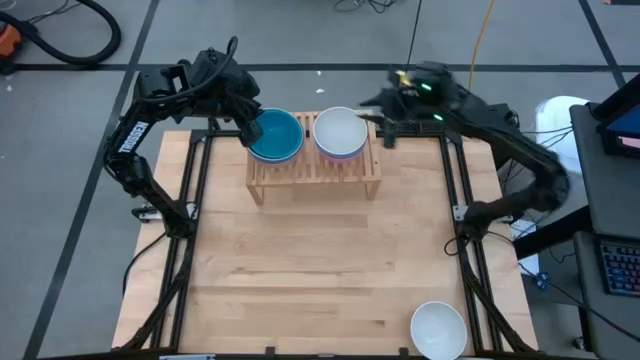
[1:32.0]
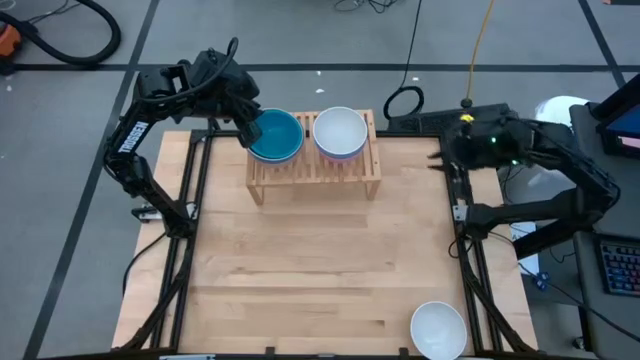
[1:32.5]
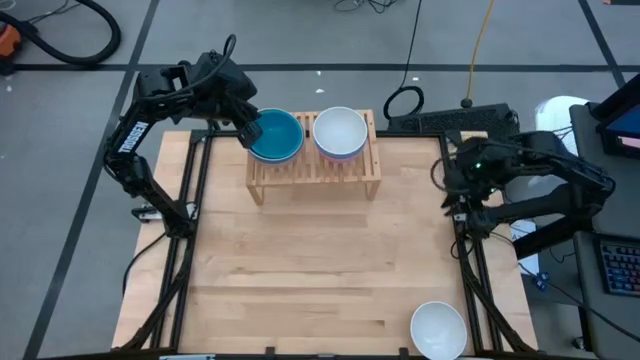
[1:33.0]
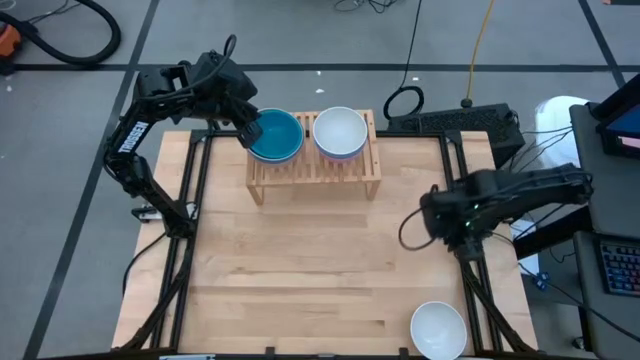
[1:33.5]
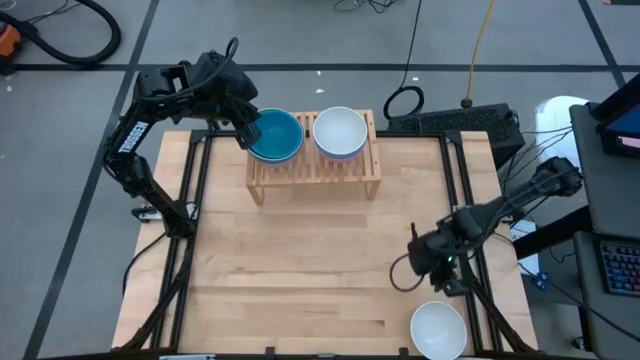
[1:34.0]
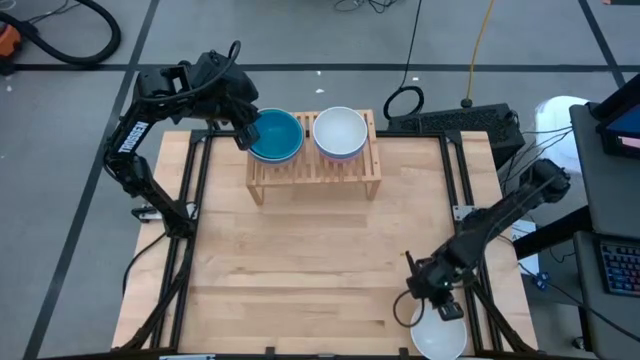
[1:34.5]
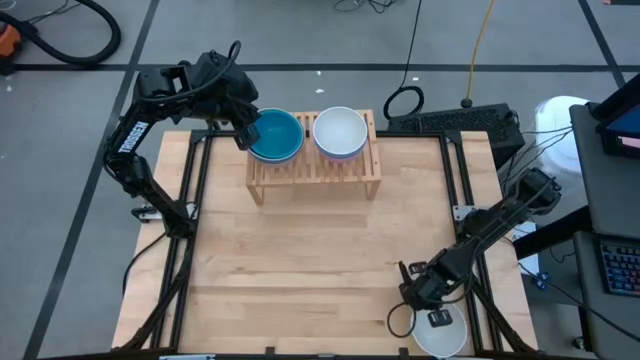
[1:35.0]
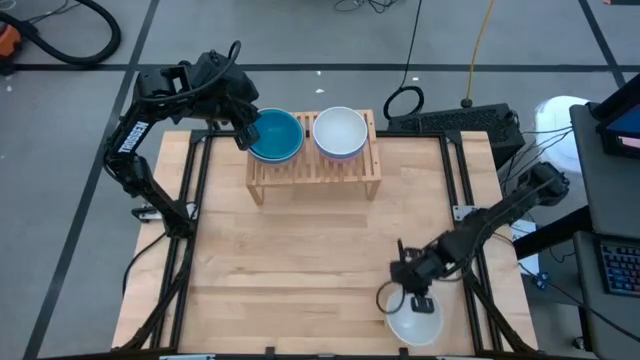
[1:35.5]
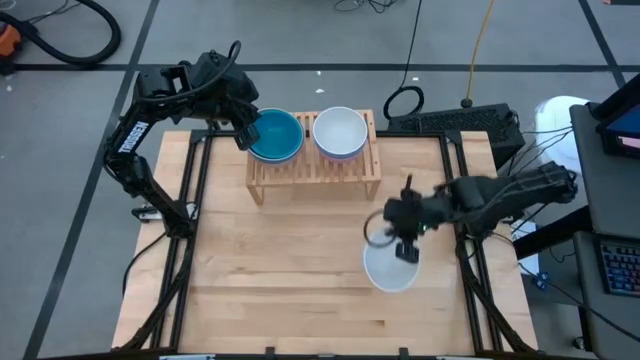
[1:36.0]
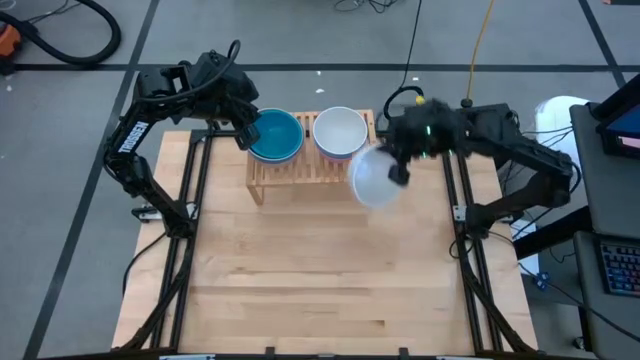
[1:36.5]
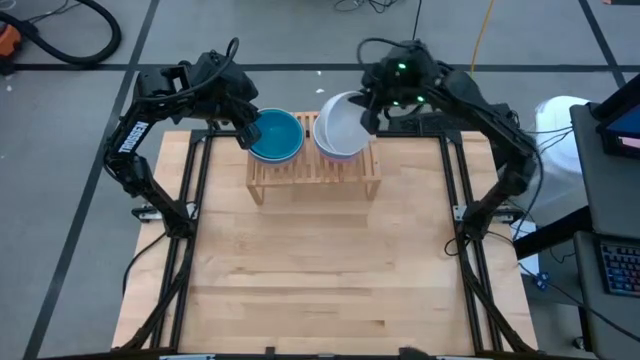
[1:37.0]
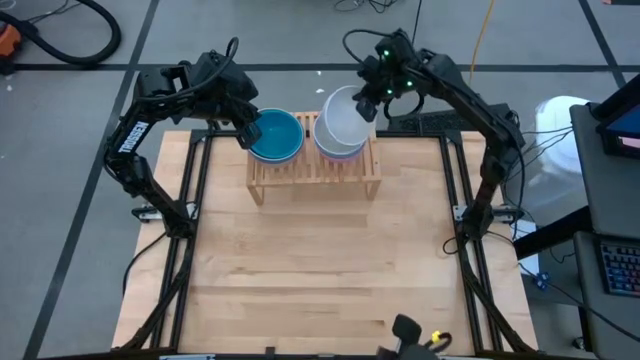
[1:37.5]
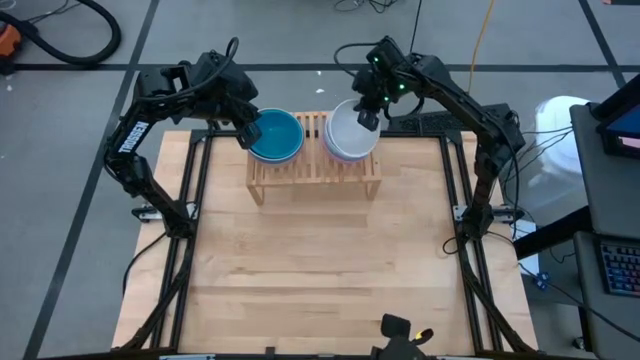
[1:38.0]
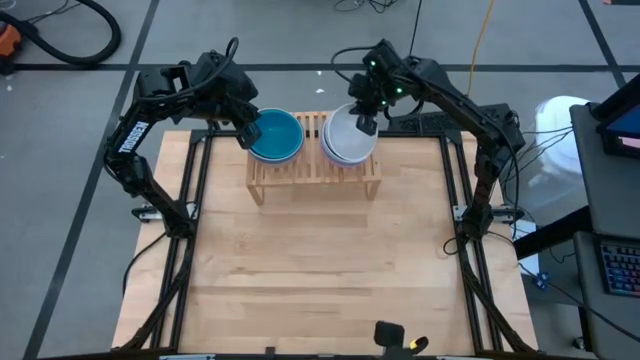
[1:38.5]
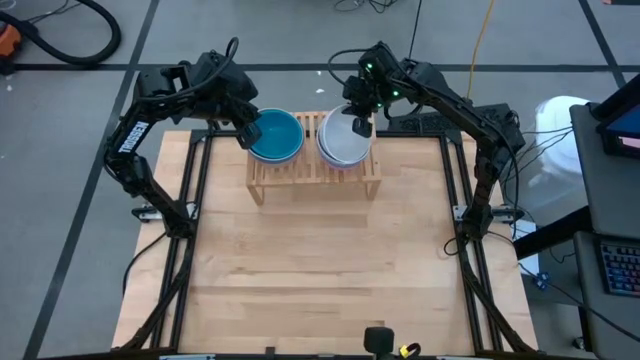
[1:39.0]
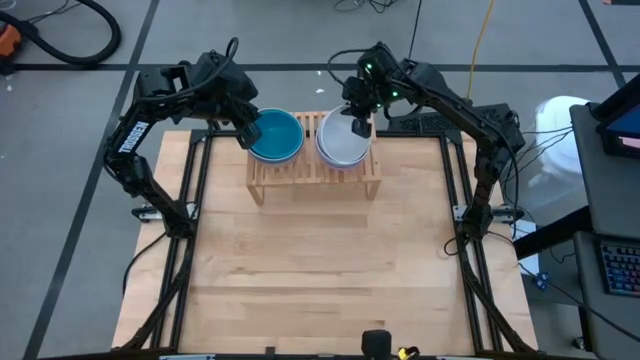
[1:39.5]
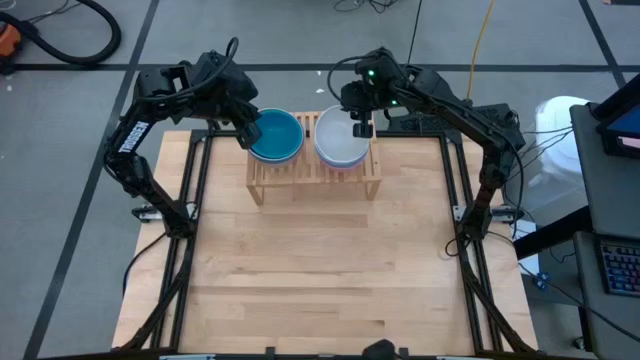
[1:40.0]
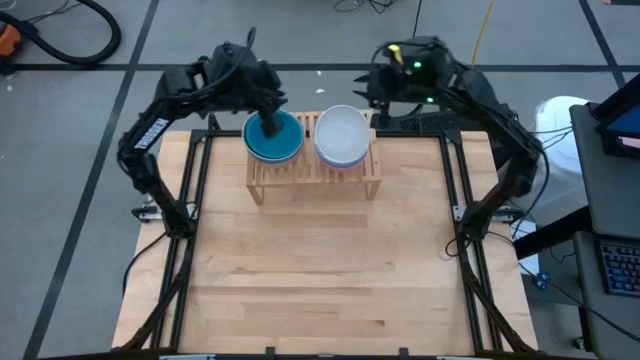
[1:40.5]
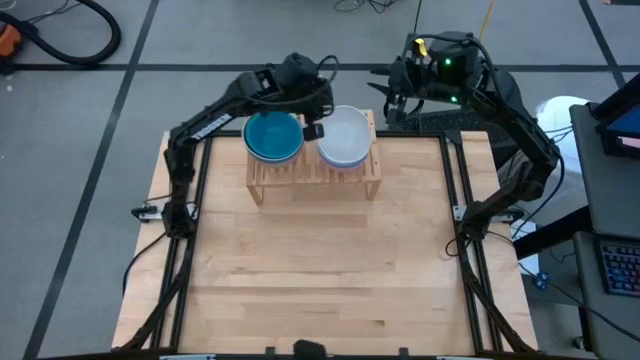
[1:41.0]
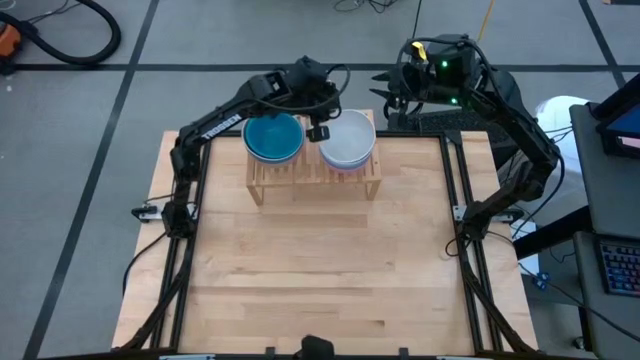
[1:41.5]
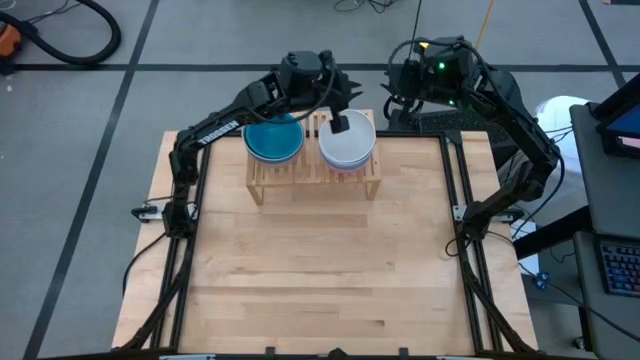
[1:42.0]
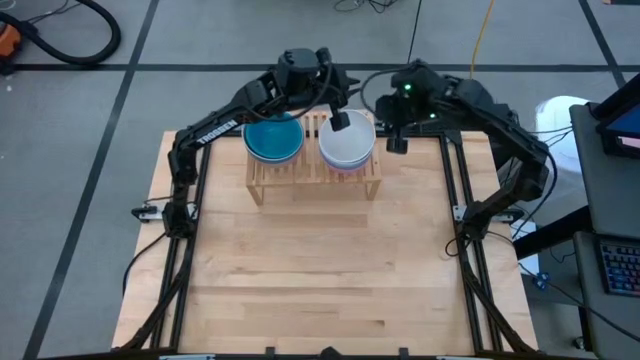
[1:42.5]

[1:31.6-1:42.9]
Task: Place and stack bowls onto a shelf
Stack the white bowl on top of the white bowl on the shelf

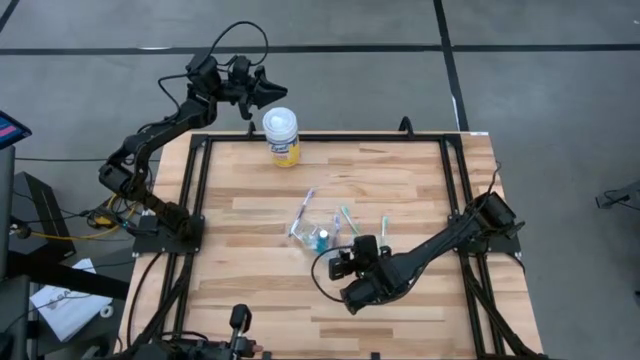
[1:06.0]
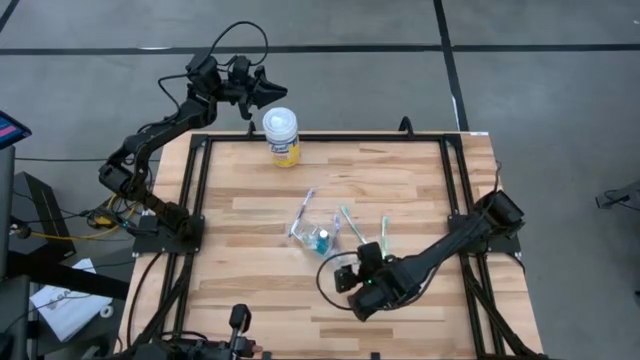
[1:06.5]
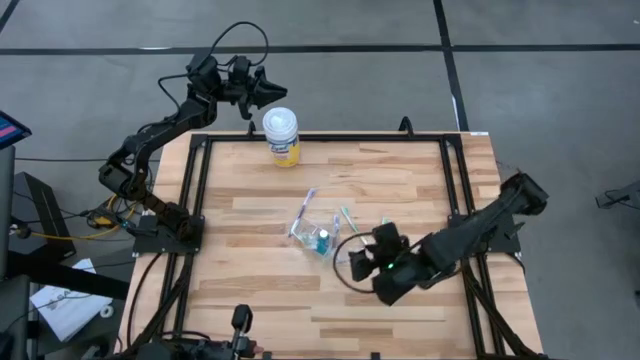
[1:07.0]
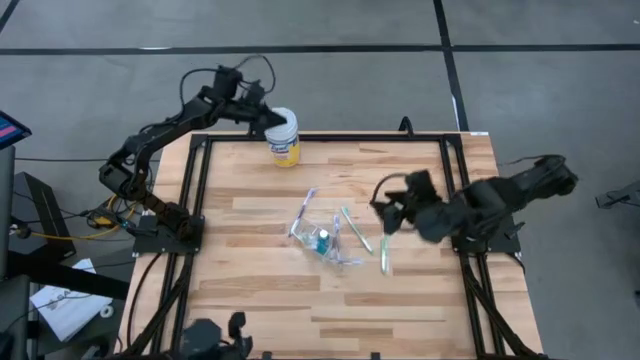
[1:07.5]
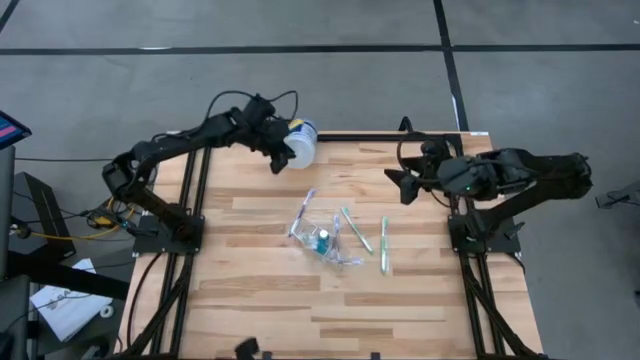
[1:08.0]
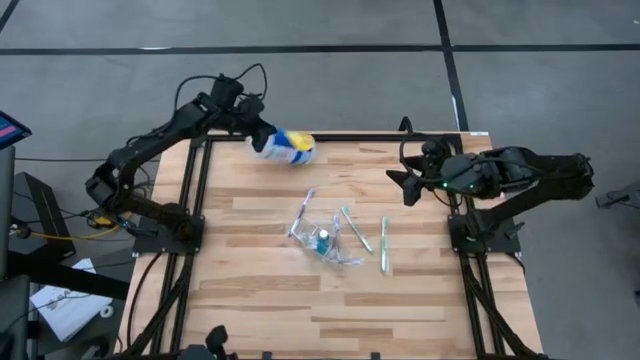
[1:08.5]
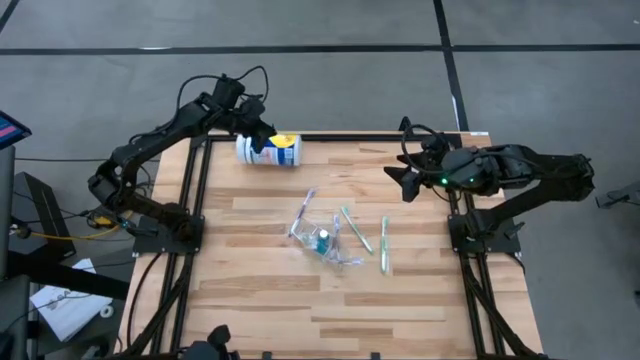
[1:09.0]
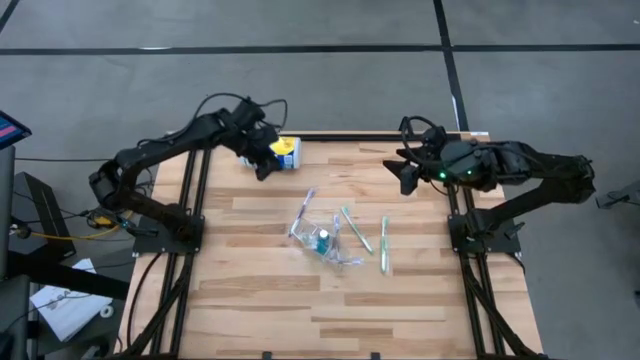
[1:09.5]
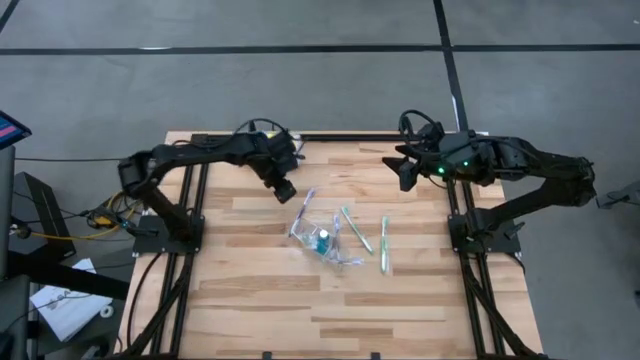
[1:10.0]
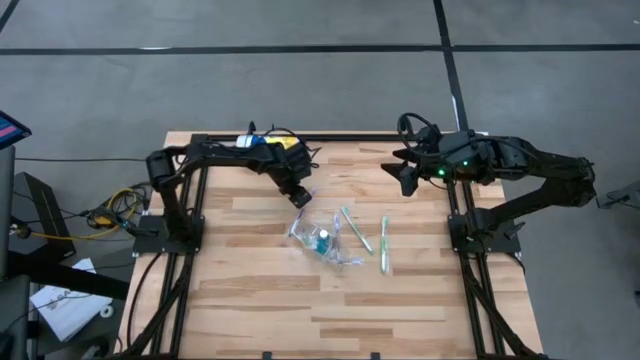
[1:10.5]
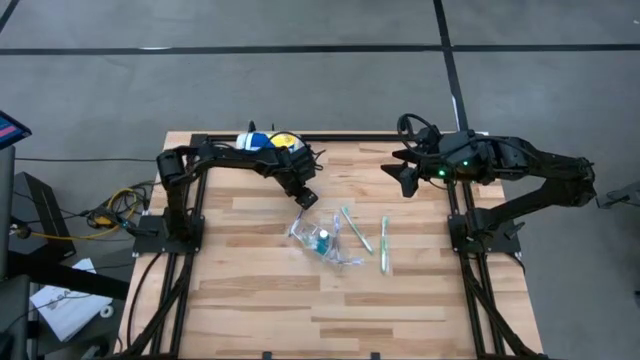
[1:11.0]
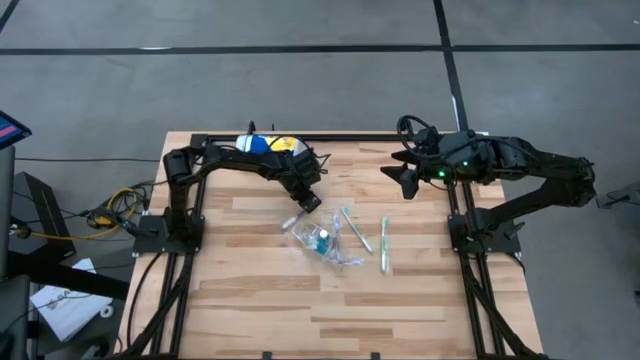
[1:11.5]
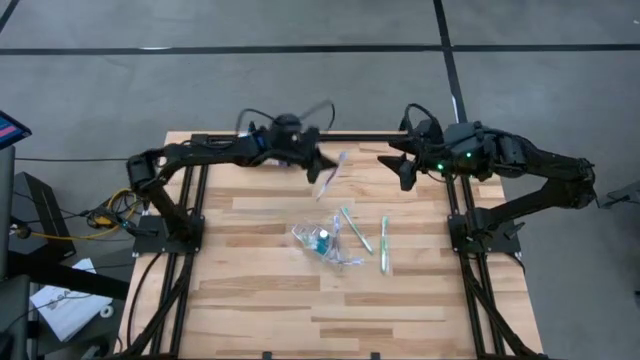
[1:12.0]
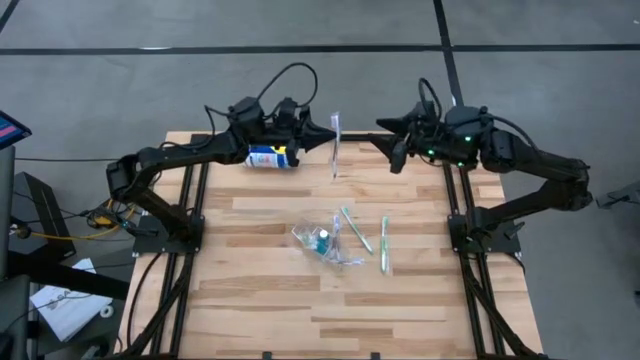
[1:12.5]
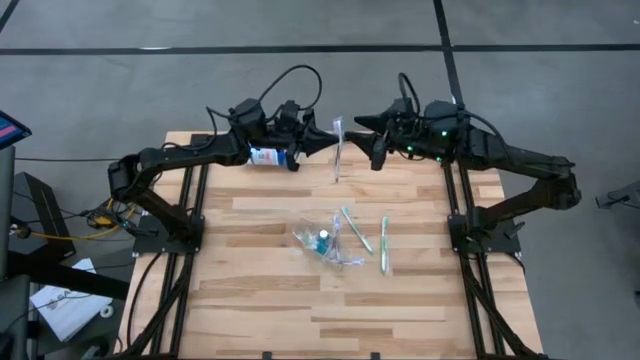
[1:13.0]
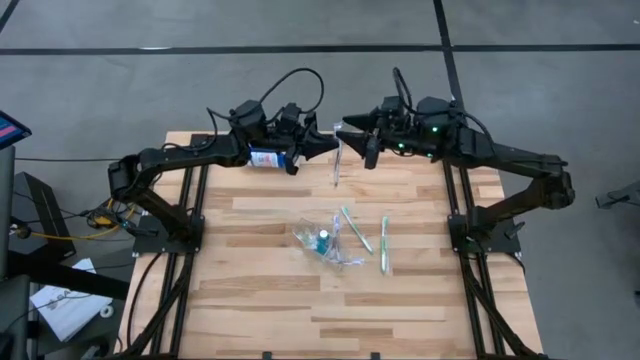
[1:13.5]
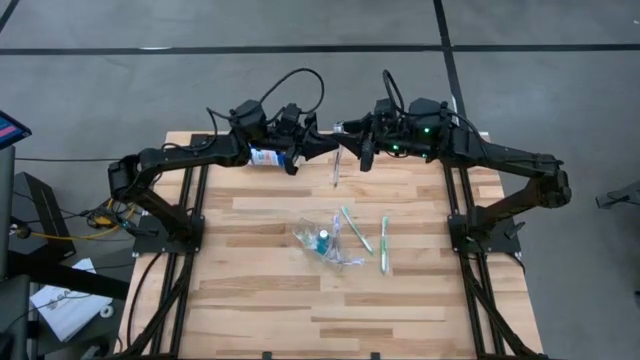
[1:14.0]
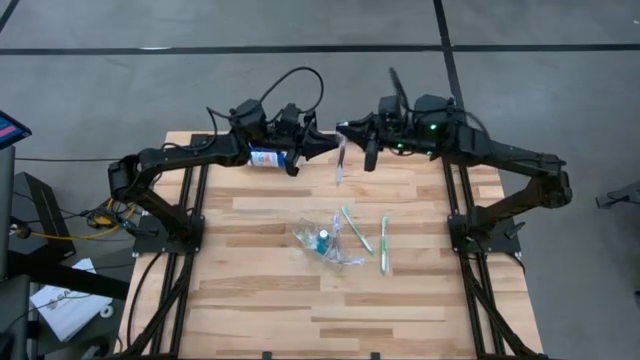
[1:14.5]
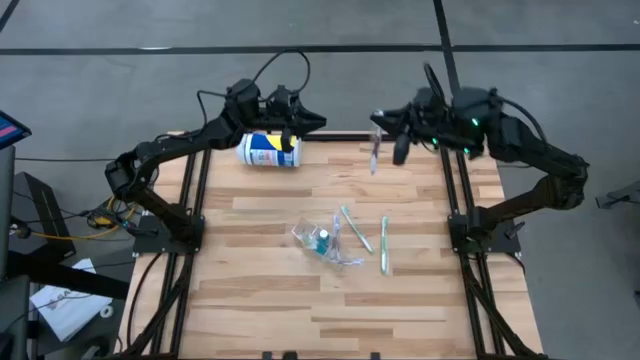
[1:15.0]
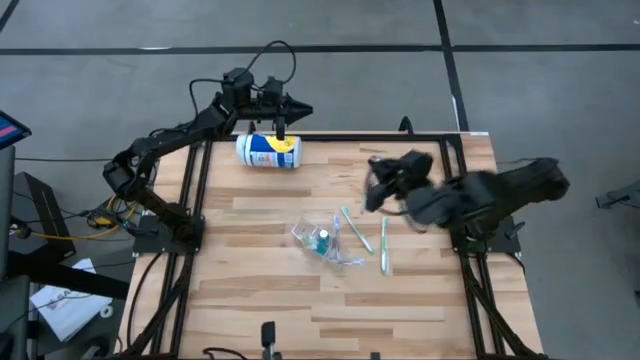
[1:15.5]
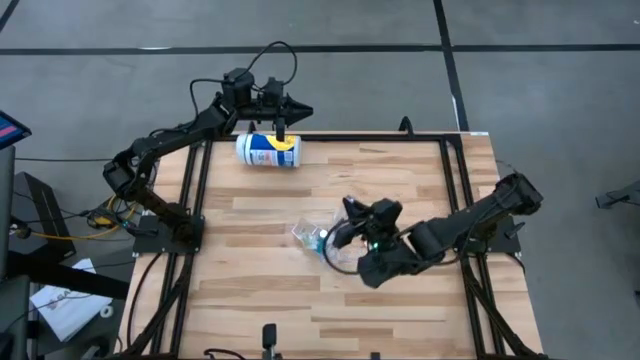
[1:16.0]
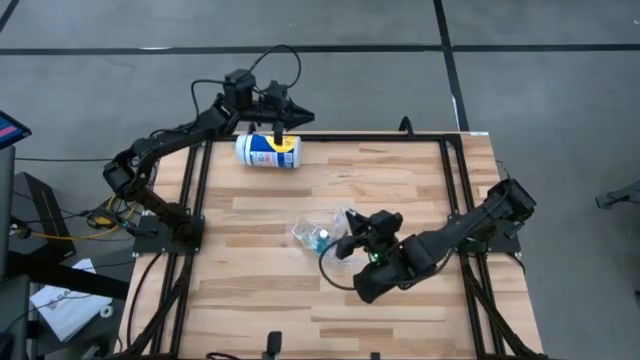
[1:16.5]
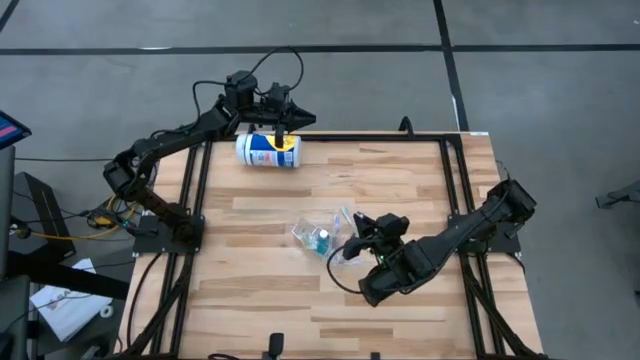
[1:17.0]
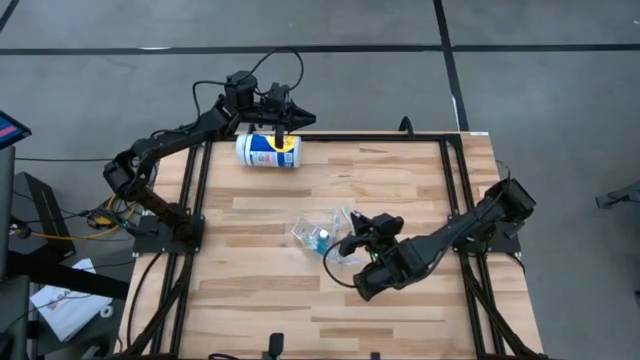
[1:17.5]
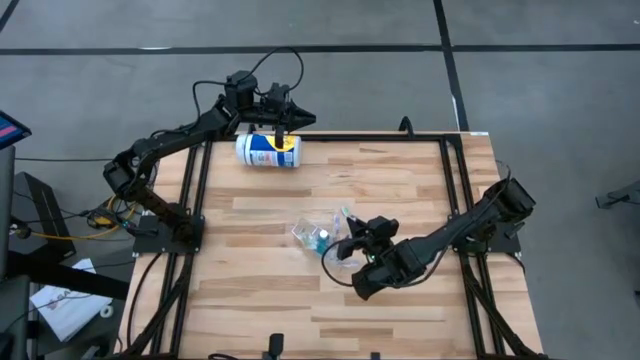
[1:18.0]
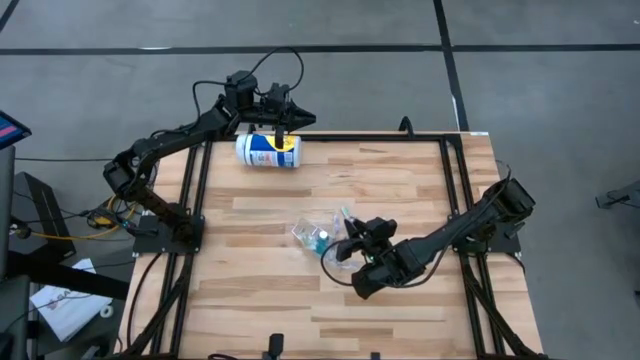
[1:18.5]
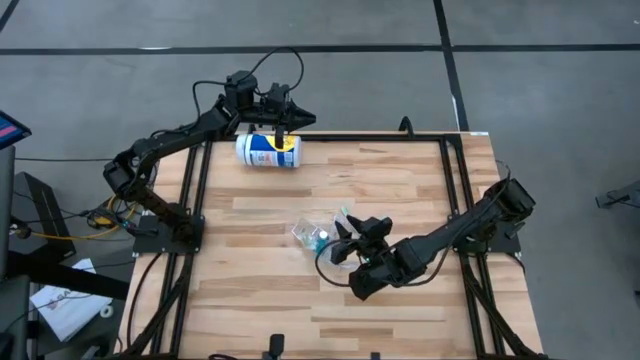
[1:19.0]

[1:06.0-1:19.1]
Task: Pick & Place toothbrushing station
Put the purple toothbrush into the right compartment of the transparent organizer
